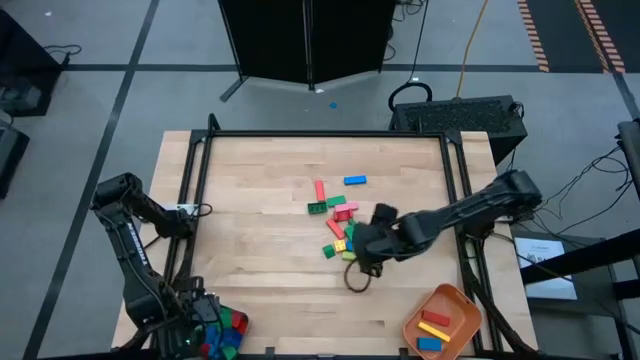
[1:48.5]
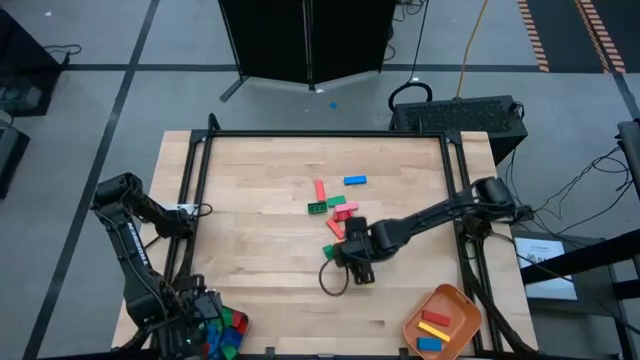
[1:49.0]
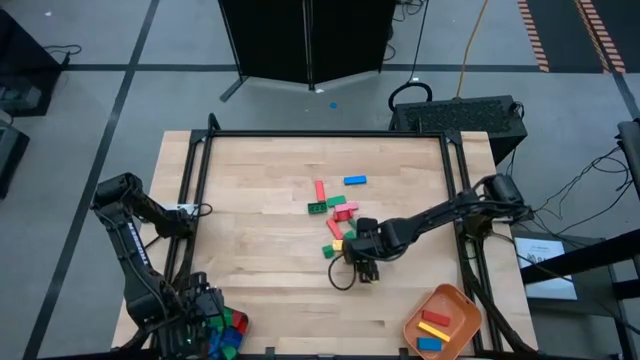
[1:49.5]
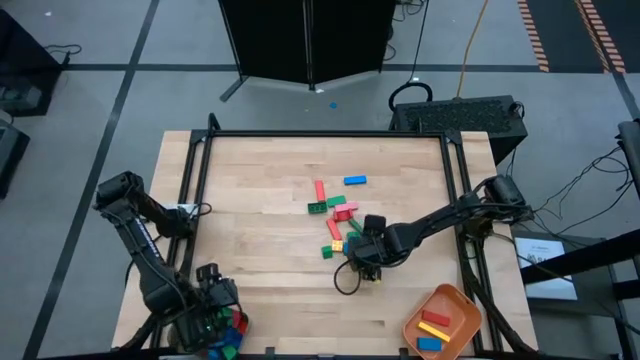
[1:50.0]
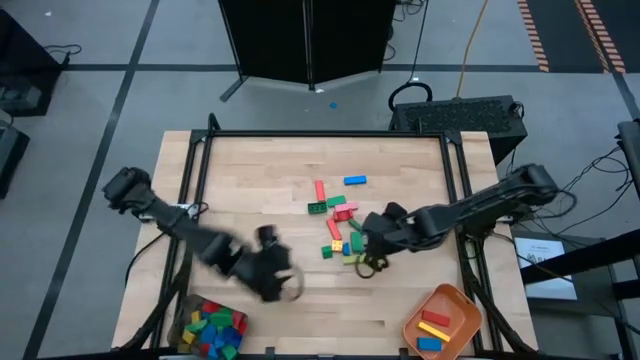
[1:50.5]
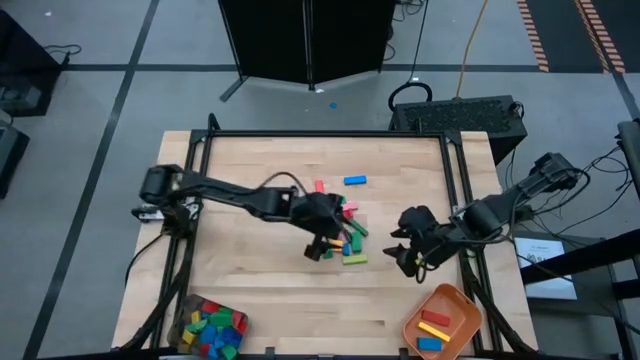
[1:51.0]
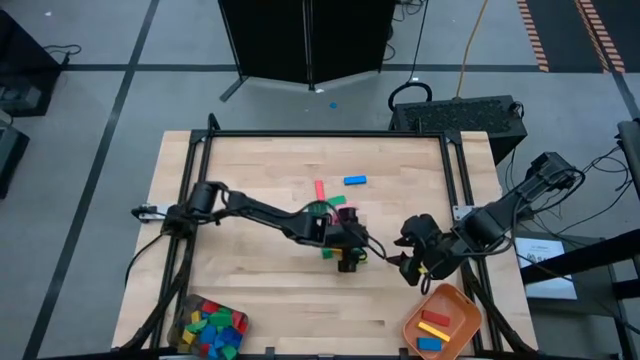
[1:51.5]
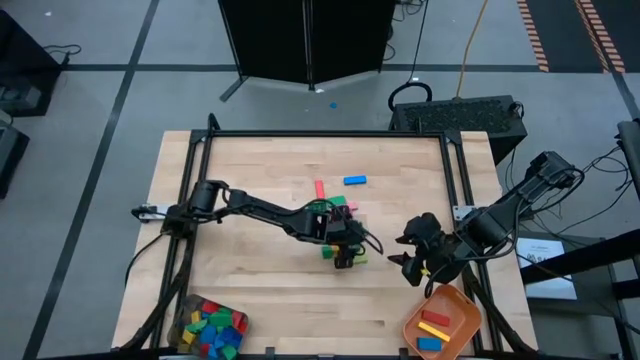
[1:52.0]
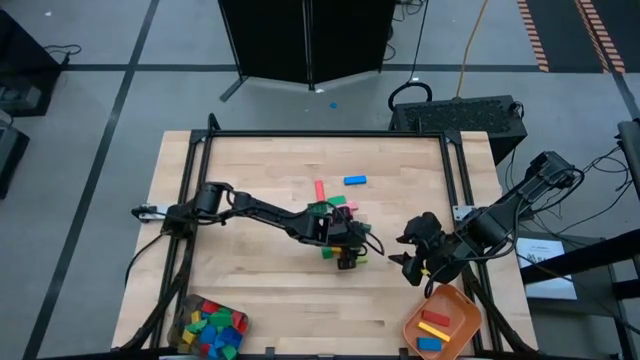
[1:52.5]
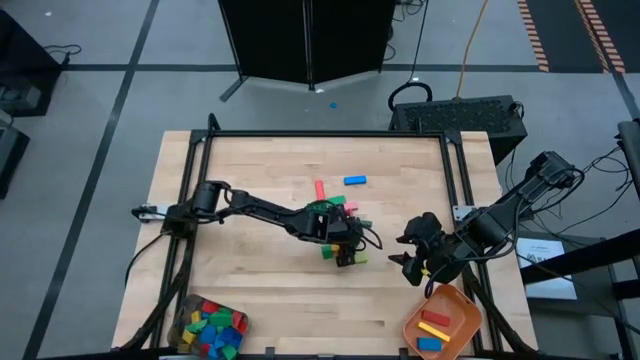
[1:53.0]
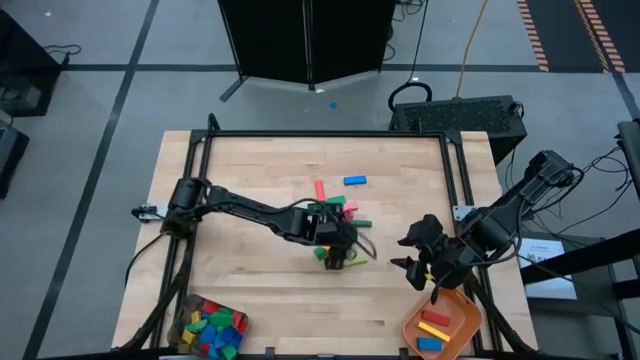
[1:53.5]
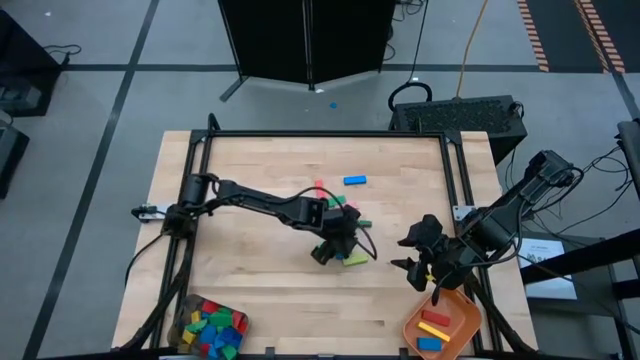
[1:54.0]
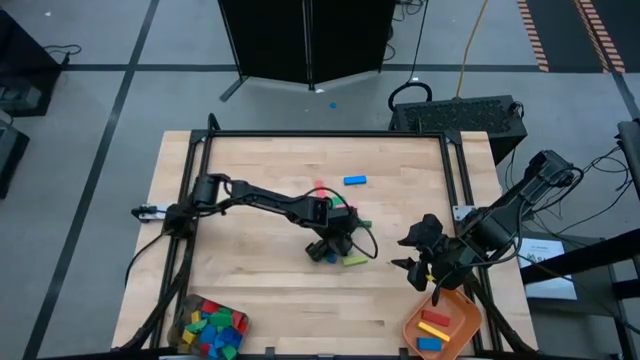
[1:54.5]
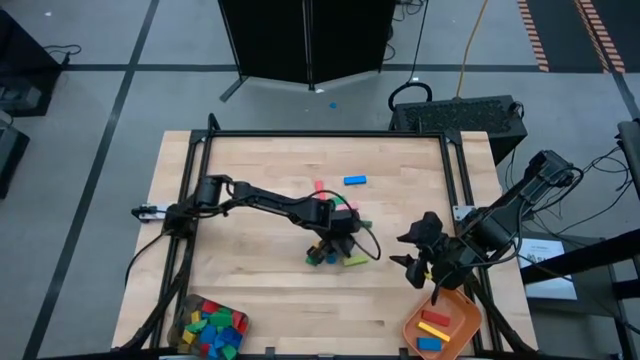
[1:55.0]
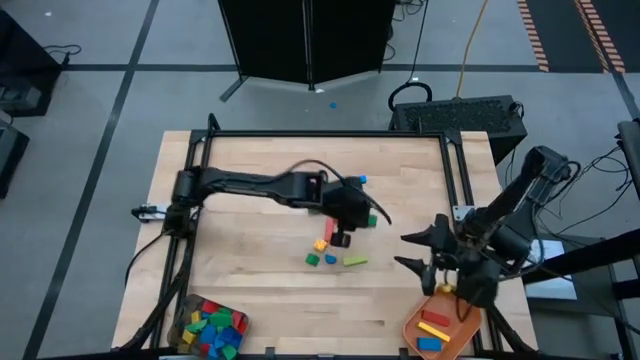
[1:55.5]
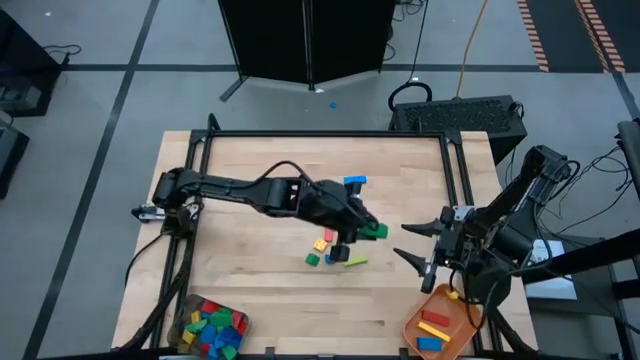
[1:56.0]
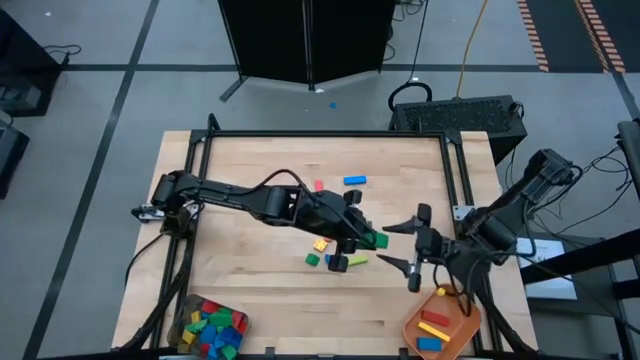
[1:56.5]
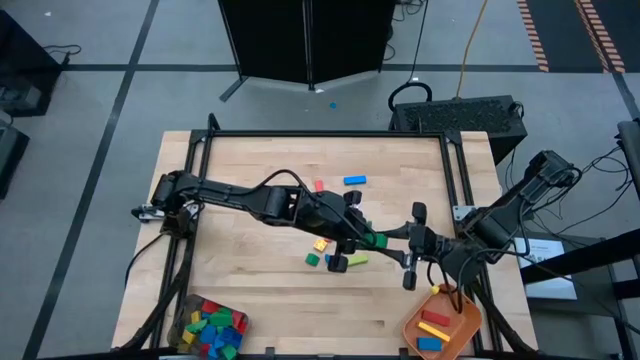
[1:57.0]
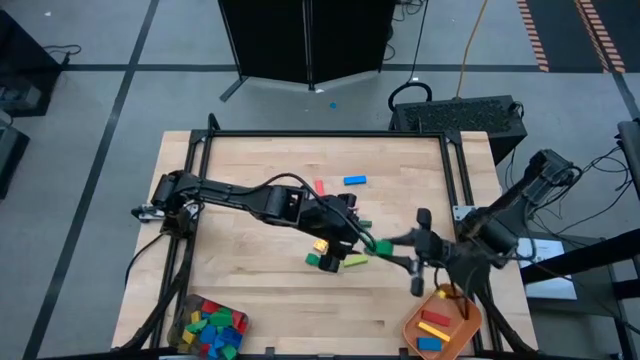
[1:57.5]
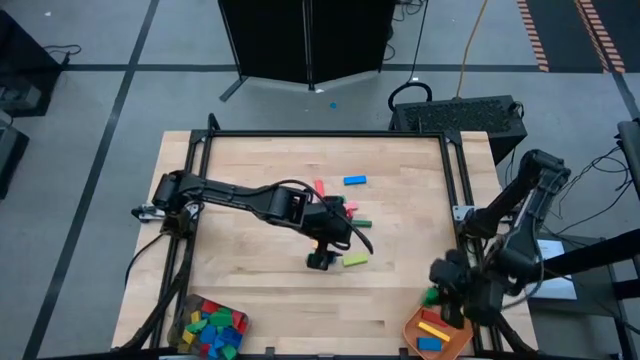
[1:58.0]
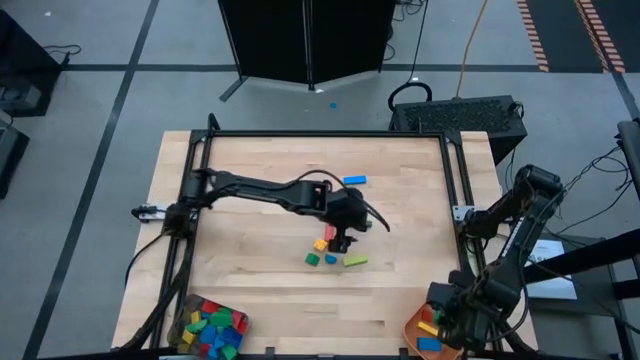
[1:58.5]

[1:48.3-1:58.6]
Task: Sort blocks by size
Put the green rectangular block into the orange bin

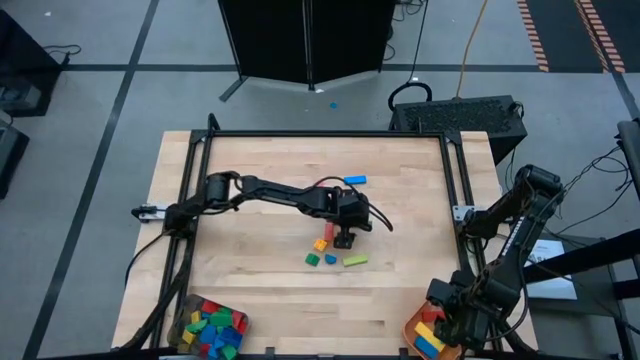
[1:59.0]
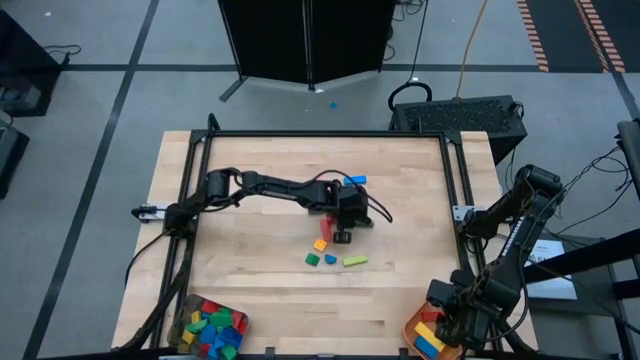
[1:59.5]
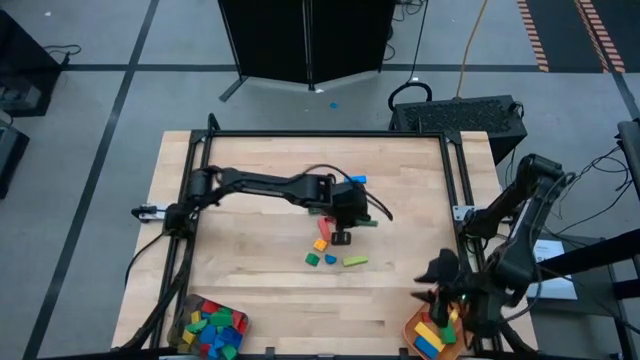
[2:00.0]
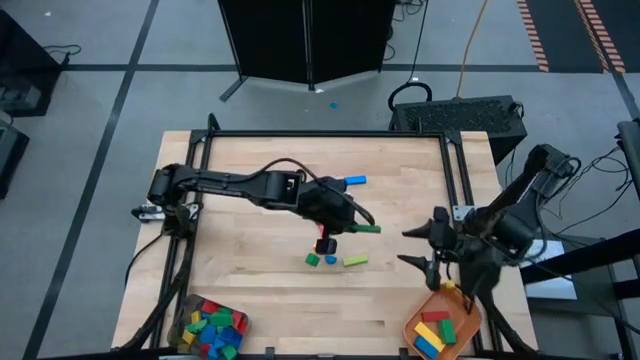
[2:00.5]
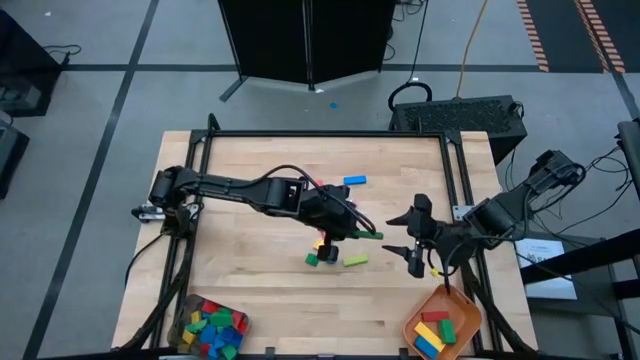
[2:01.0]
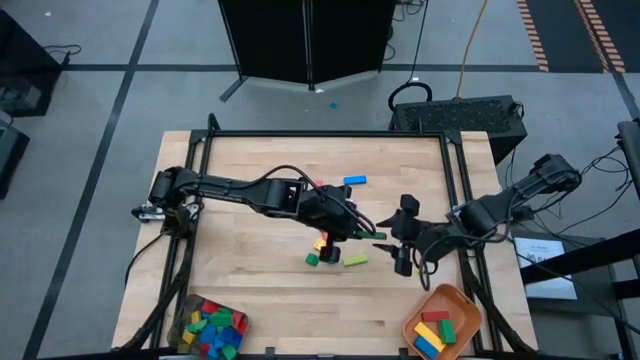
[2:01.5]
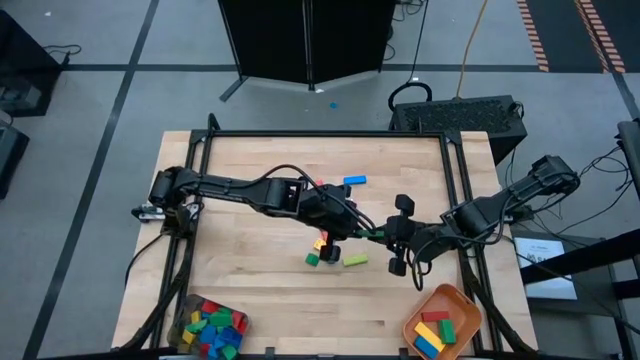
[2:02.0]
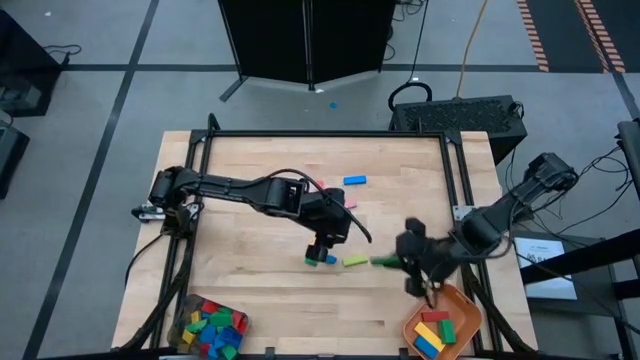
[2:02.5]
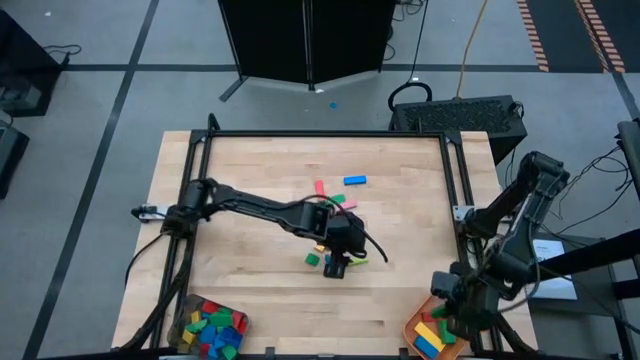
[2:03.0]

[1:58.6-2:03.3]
Put the green rectangular block into the orange bin

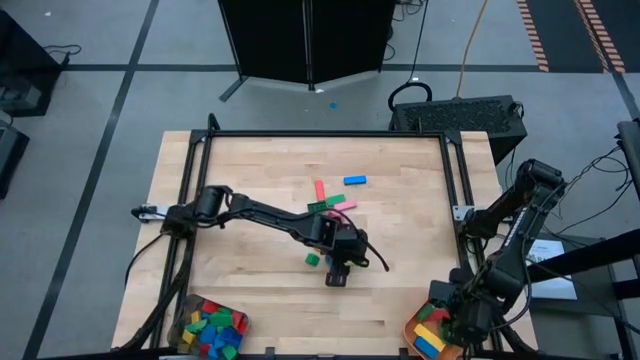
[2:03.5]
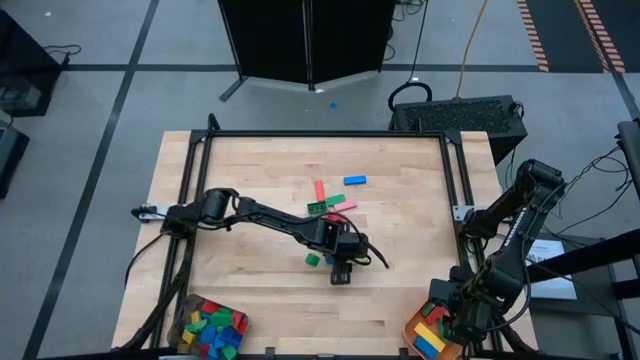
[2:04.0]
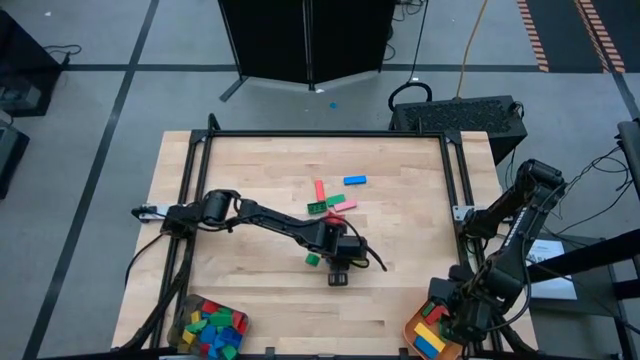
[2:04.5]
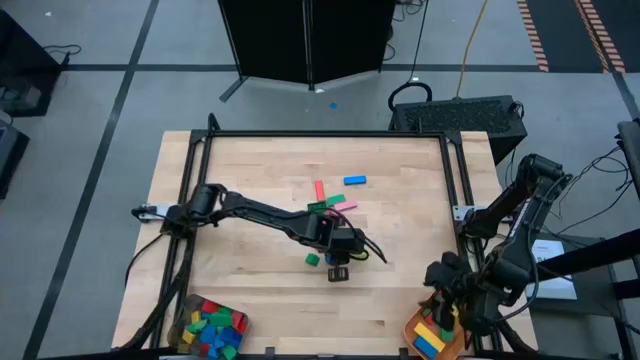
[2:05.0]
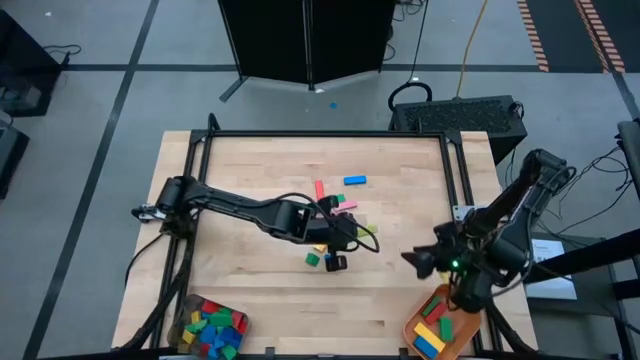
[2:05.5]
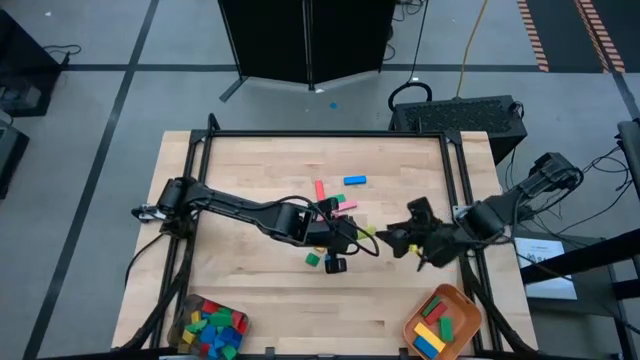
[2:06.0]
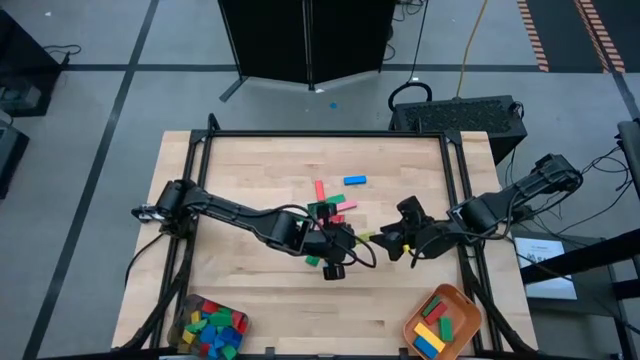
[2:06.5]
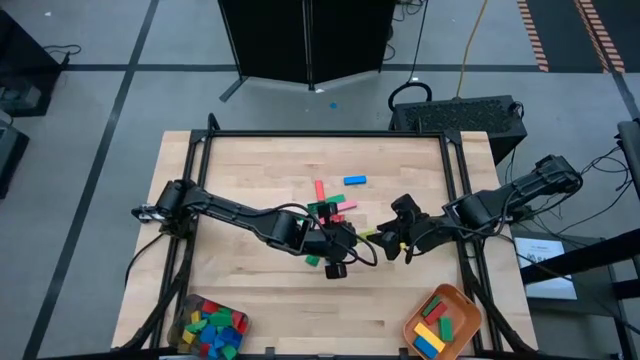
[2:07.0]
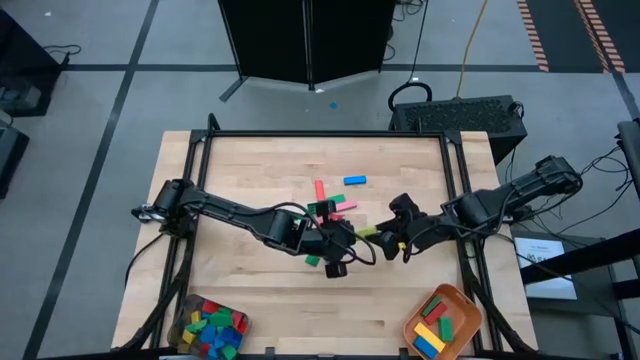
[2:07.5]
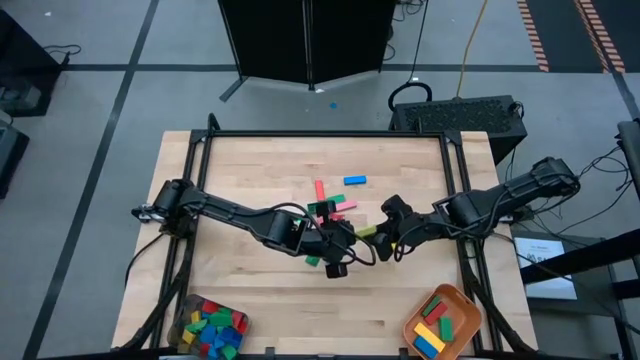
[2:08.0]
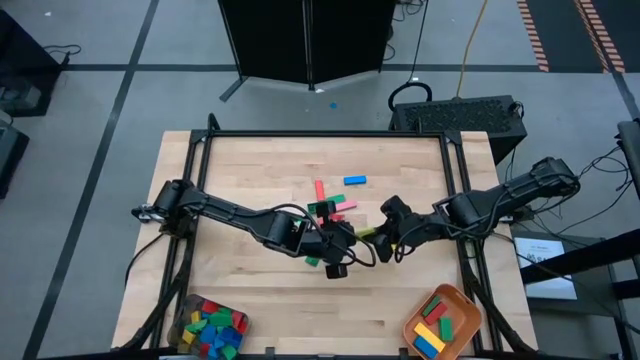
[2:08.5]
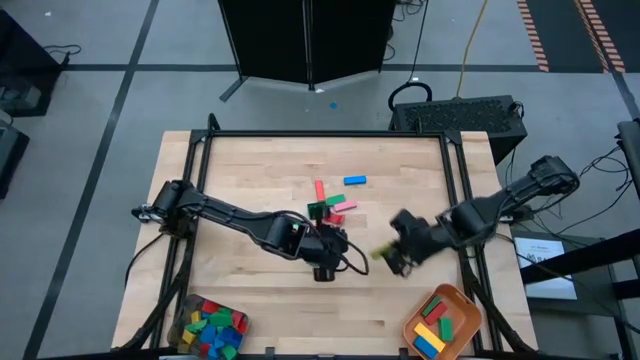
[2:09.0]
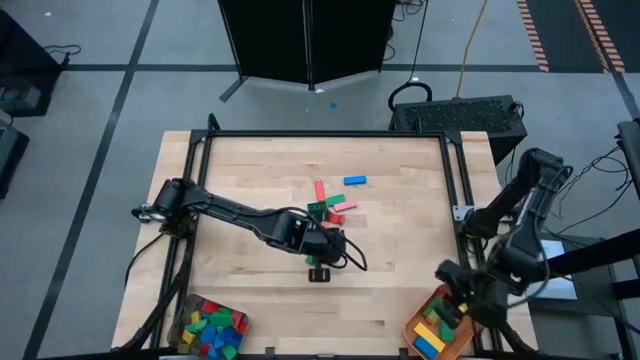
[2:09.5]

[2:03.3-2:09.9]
Put the light green rectangular block into the orange bin
